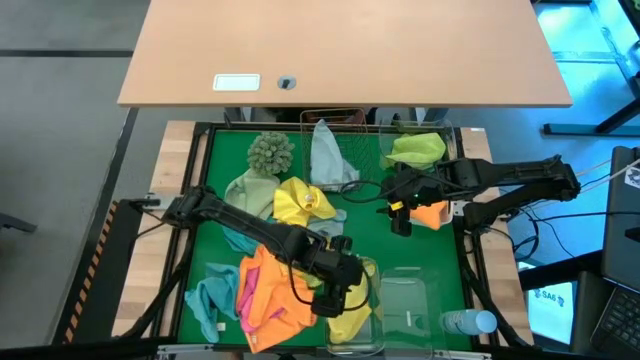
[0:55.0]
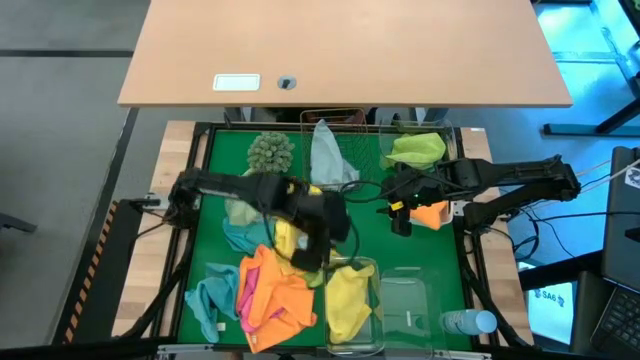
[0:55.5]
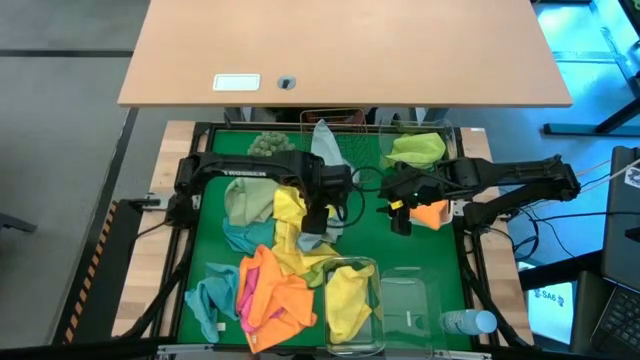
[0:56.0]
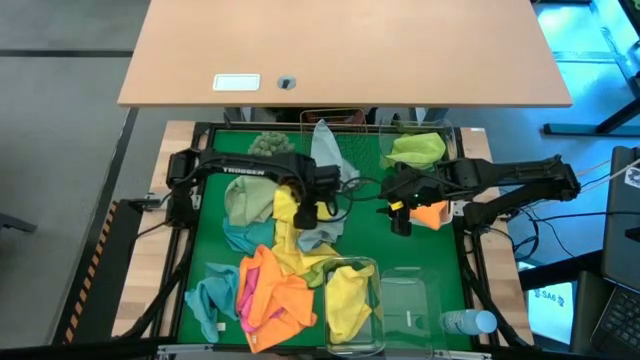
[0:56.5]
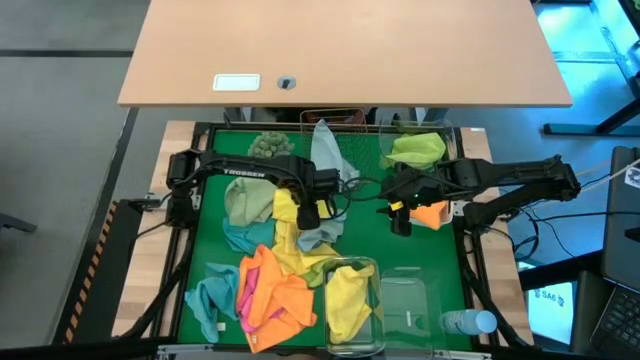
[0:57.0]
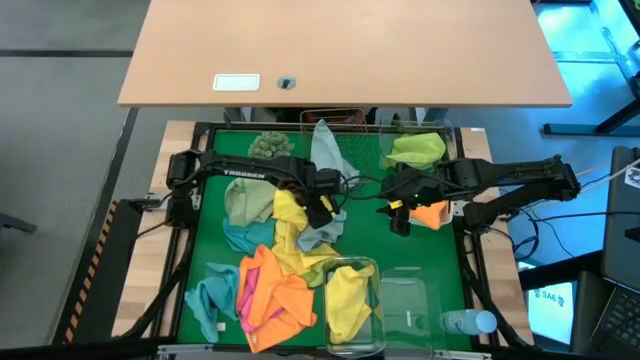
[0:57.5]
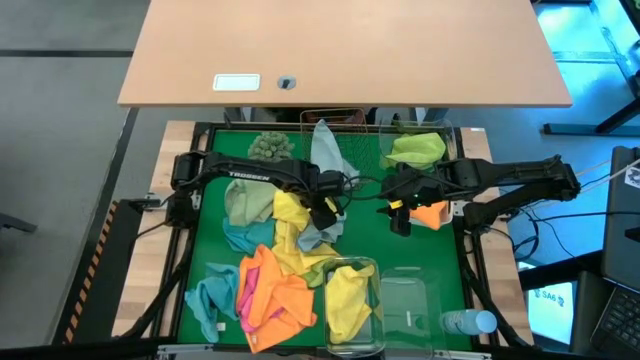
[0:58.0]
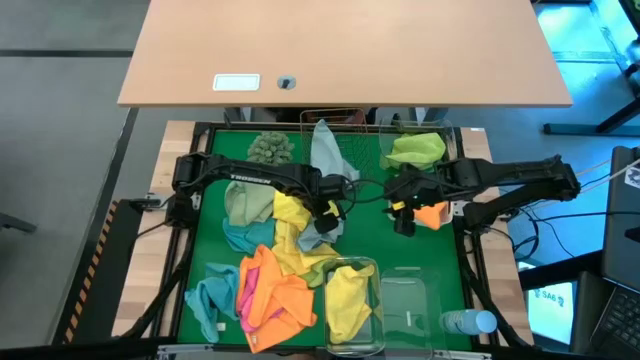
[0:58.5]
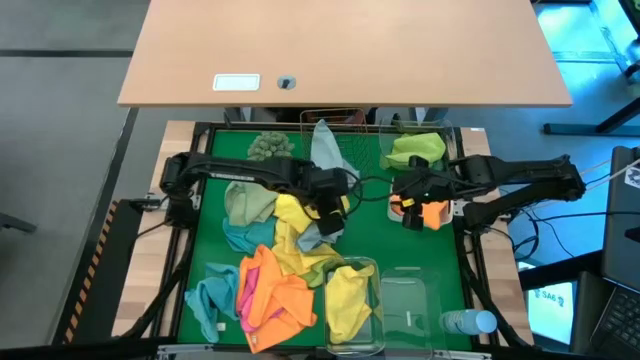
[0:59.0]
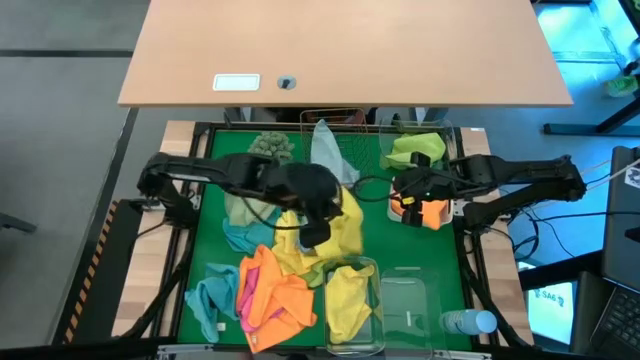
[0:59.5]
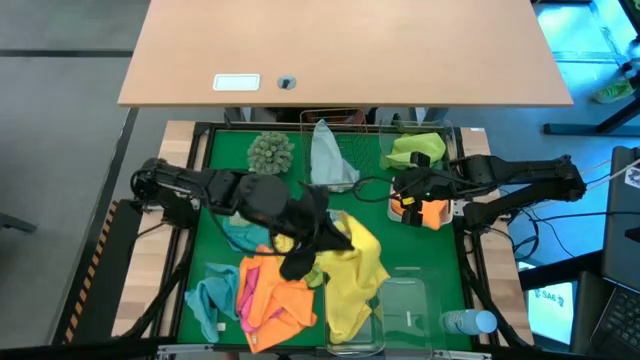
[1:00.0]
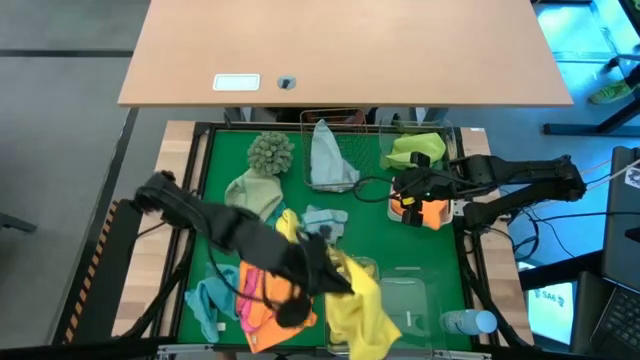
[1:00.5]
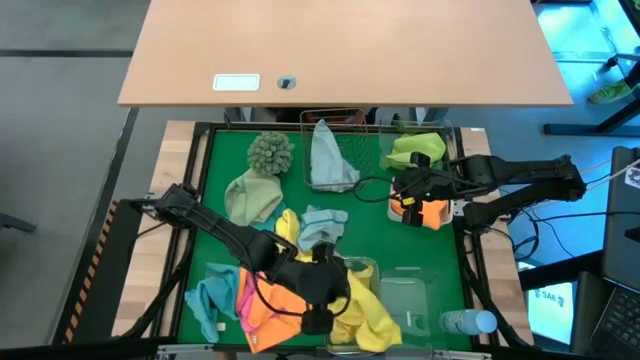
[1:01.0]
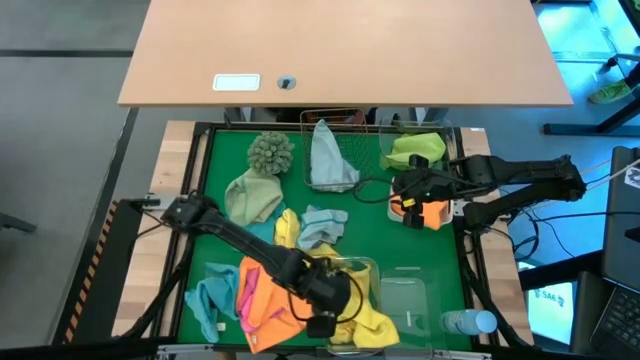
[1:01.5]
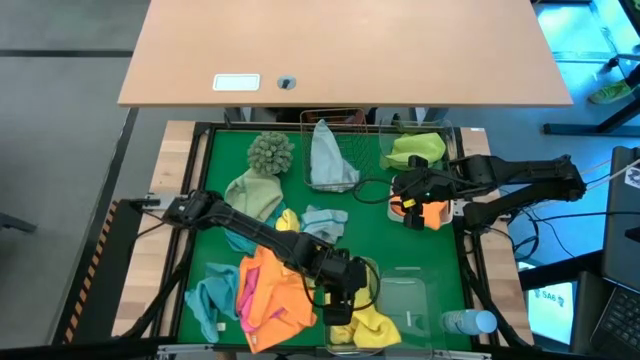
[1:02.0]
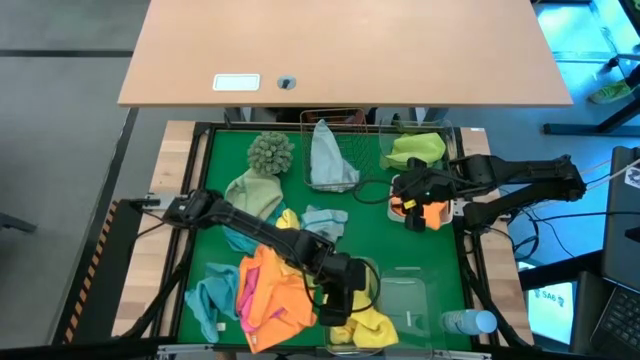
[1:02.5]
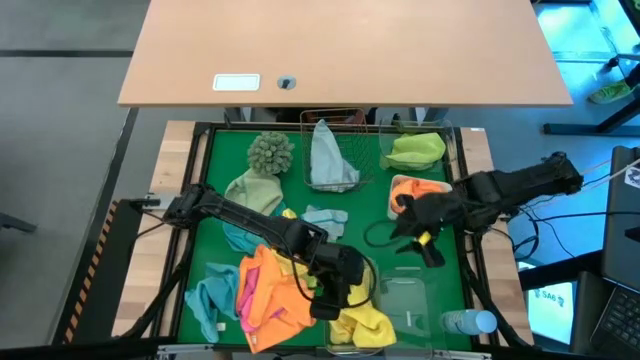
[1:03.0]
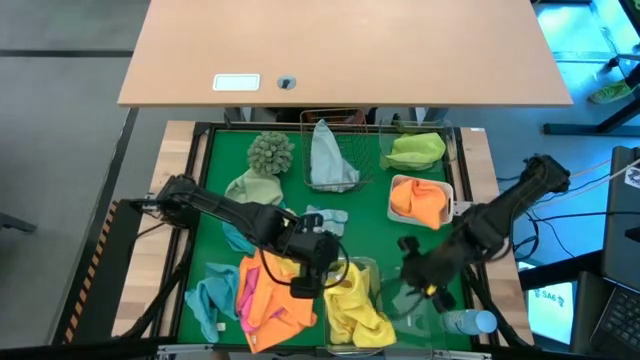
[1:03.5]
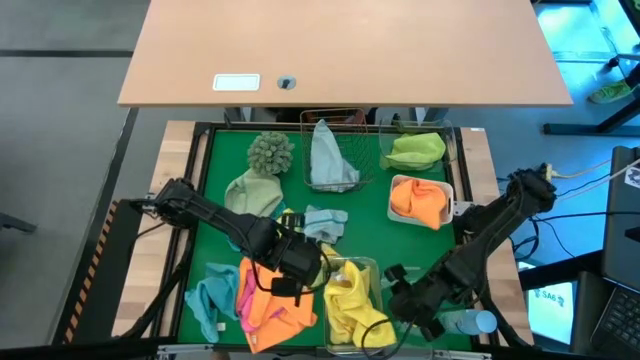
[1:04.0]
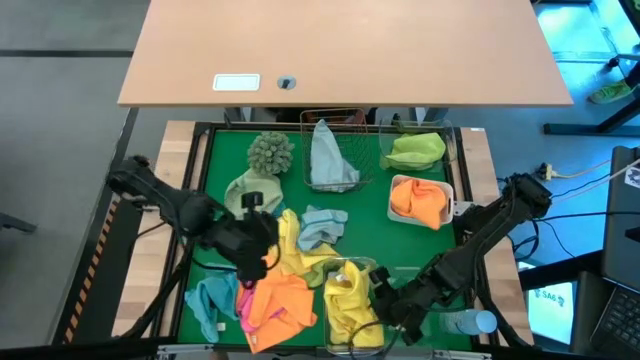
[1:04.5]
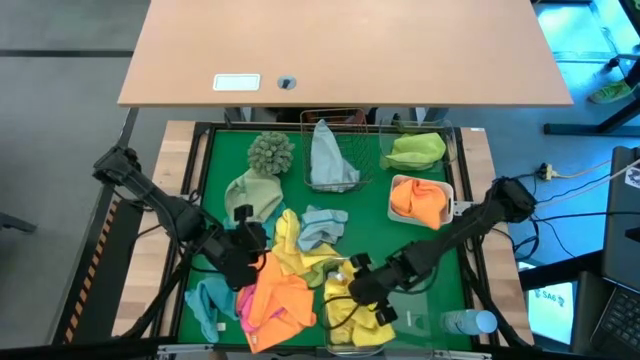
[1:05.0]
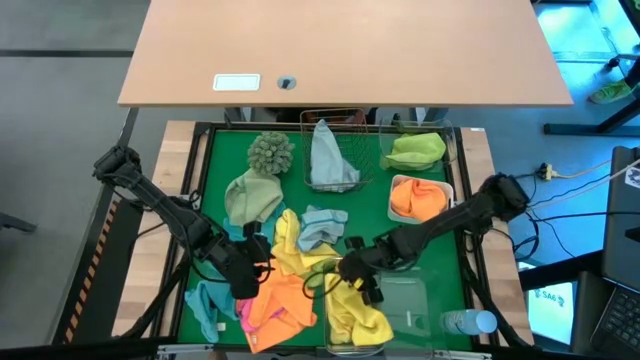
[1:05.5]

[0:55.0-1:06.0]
Task: Sort microfiber towel by color & place in baskets
Put the yellow microfiber towel into the bottom left transparent bin

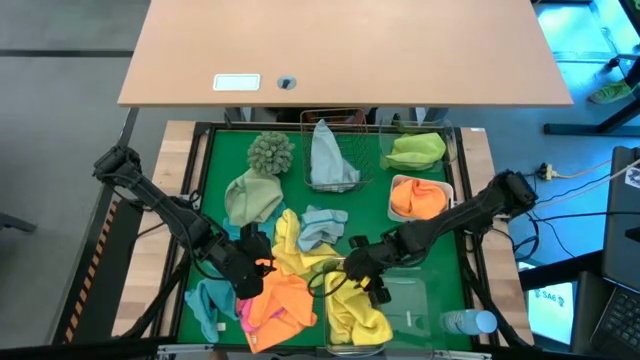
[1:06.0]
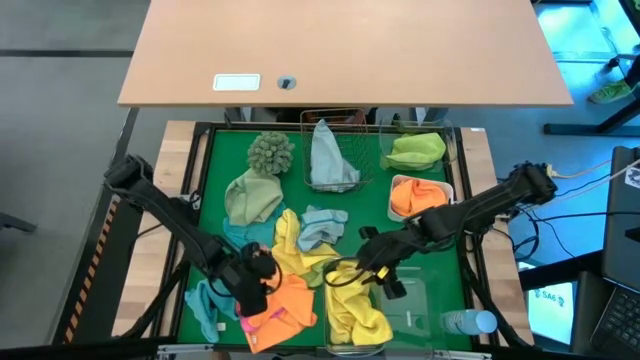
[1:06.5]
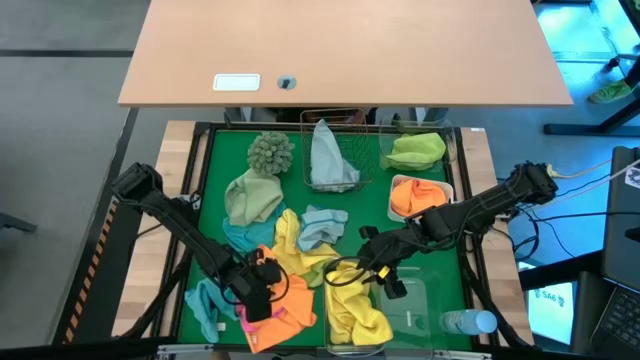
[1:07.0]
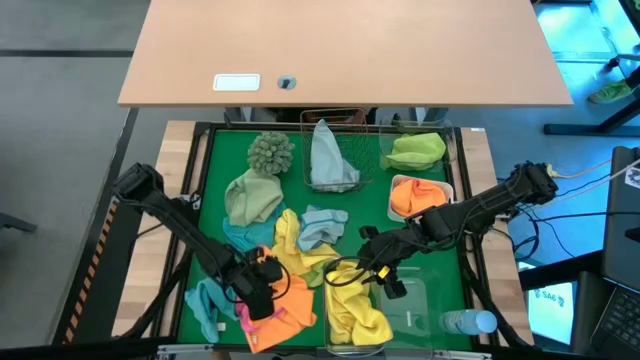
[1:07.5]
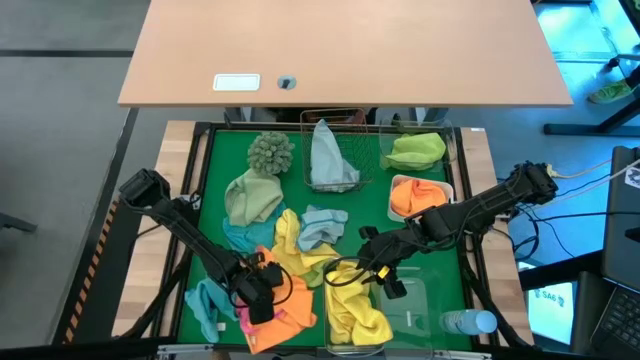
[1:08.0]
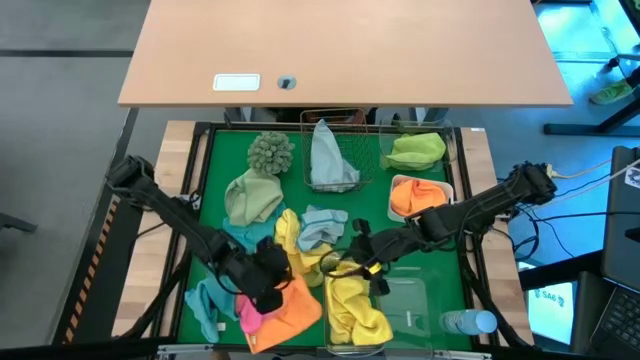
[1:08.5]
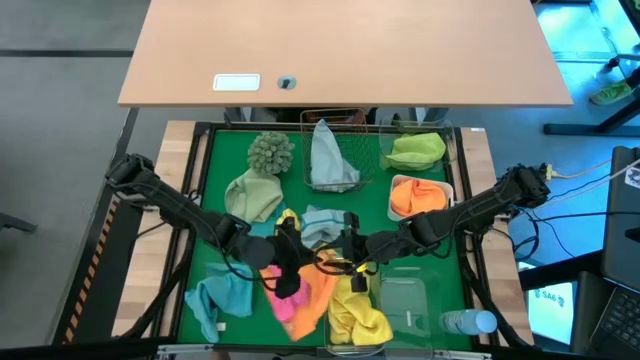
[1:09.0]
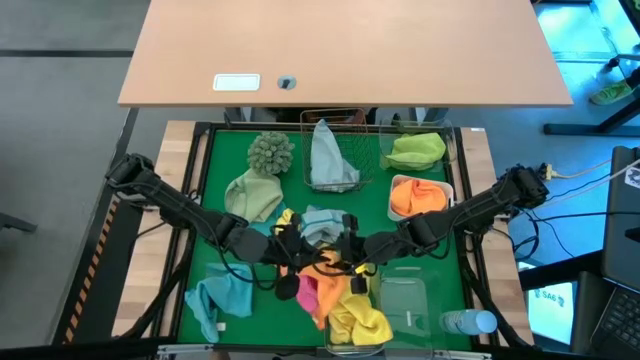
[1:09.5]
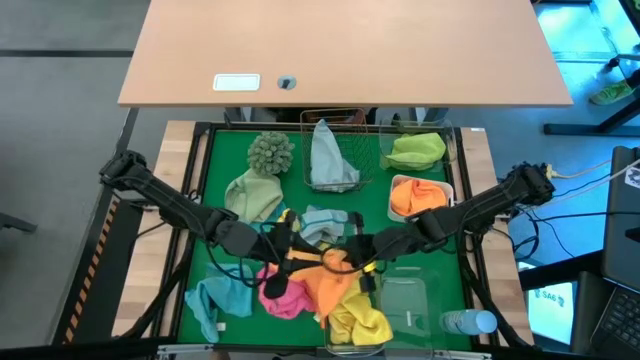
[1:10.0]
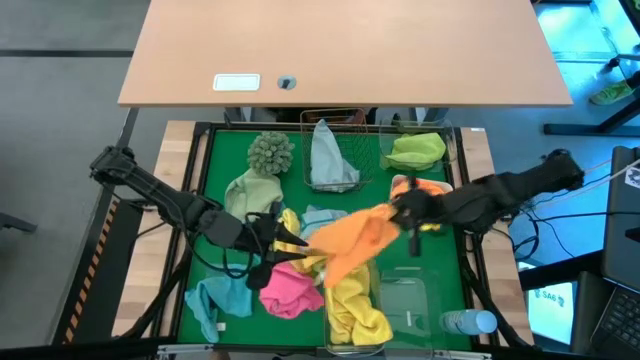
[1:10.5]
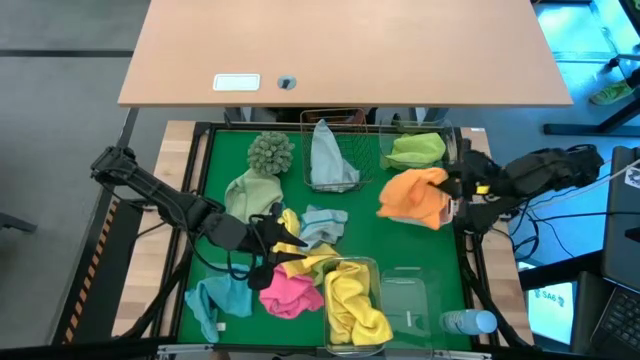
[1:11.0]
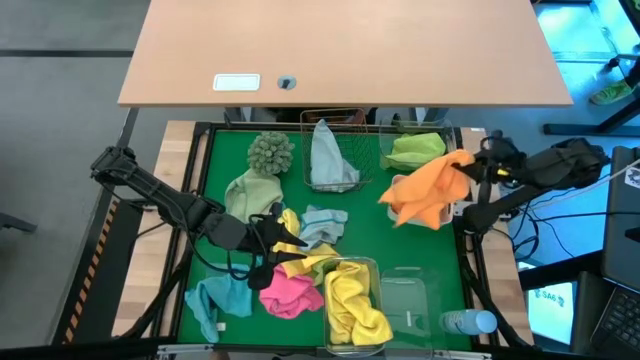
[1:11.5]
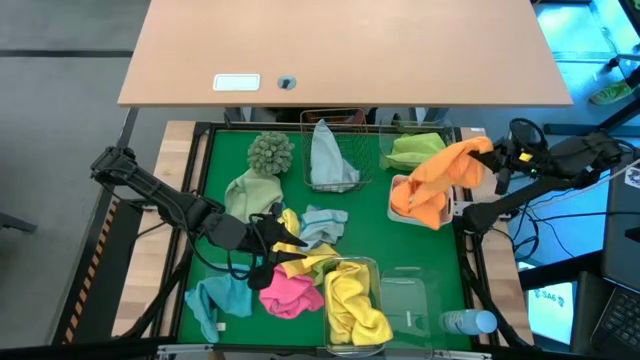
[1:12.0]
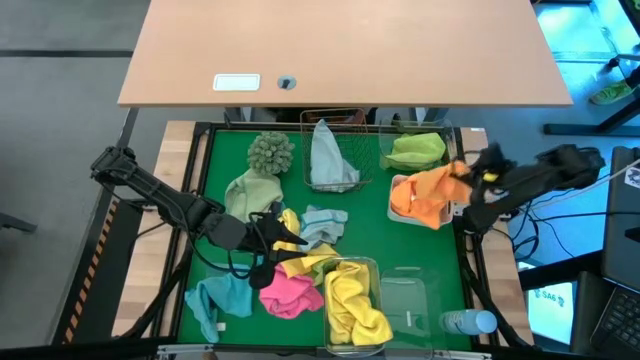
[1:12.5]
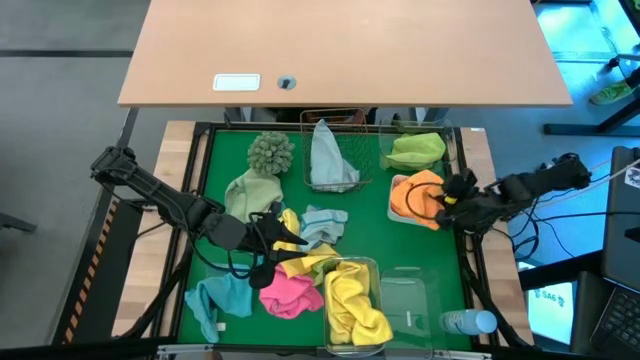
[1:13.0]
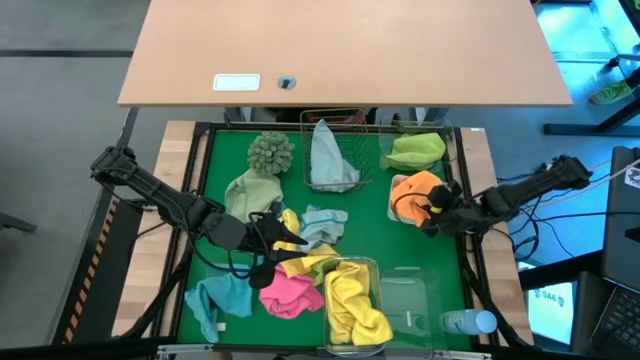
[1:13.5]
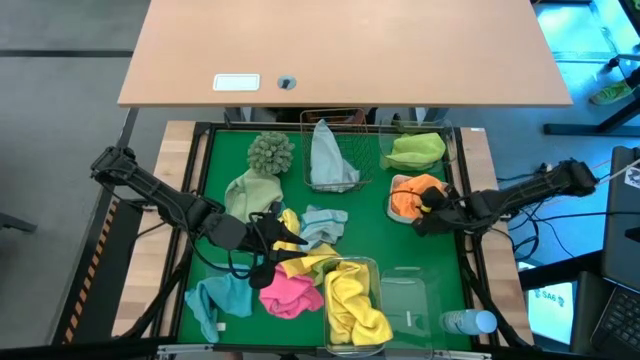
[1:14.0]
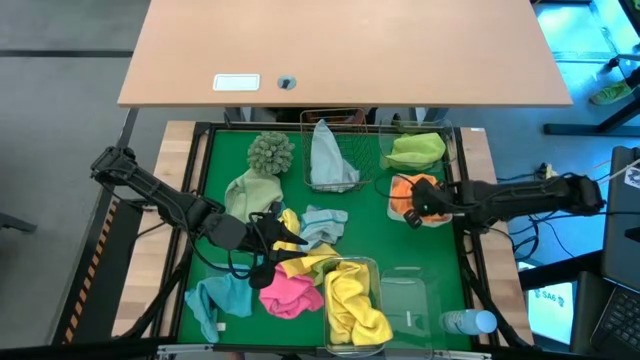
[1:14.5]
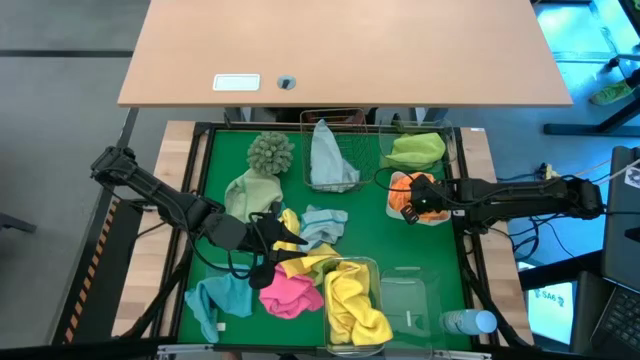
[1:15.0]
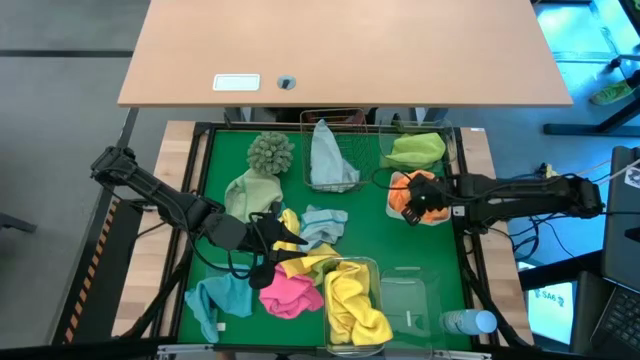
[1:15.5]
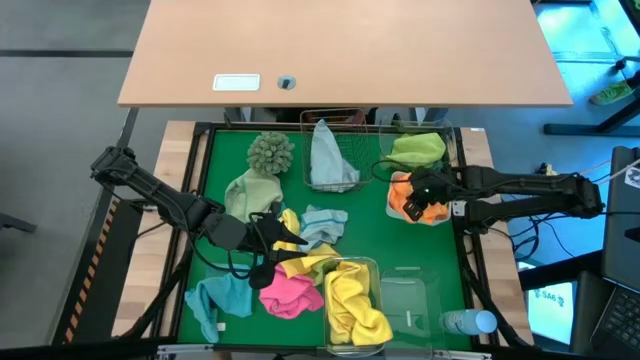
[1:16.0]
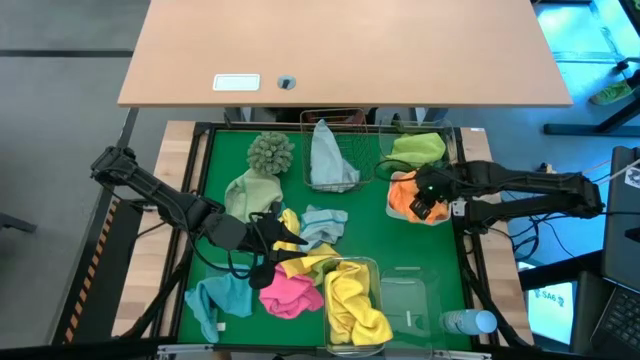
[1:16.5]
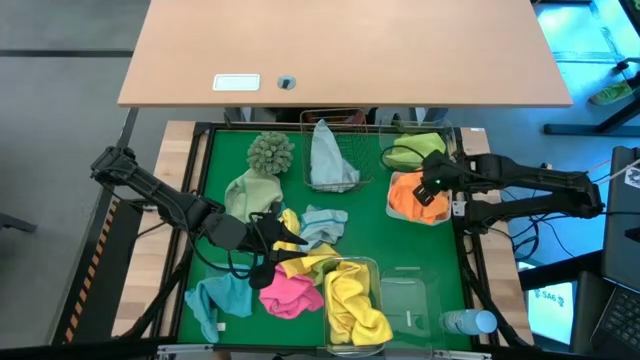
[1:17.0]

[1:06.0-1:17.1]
Put the orange microfiber towel into the white bin
